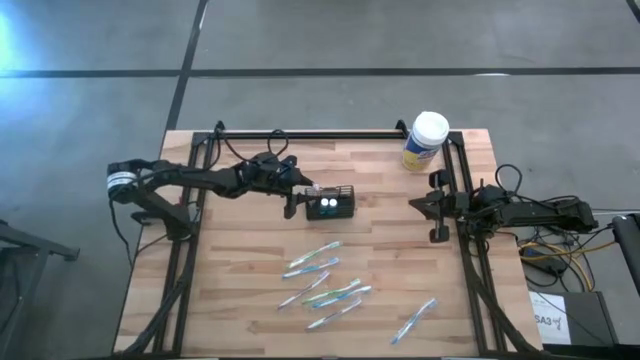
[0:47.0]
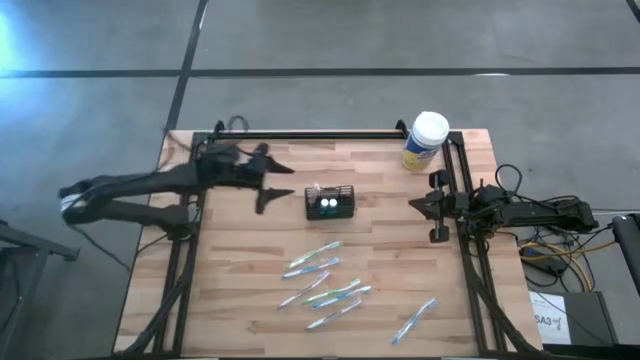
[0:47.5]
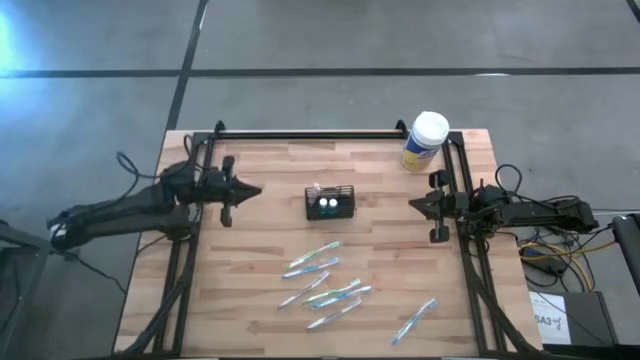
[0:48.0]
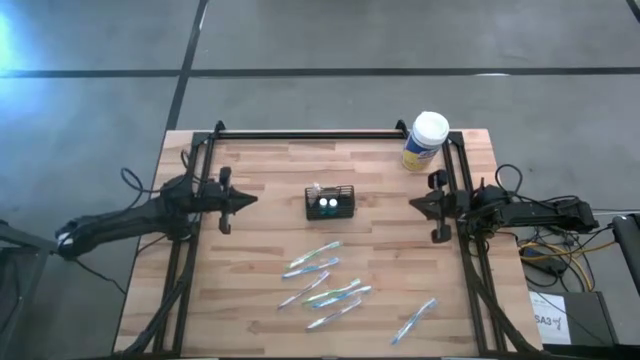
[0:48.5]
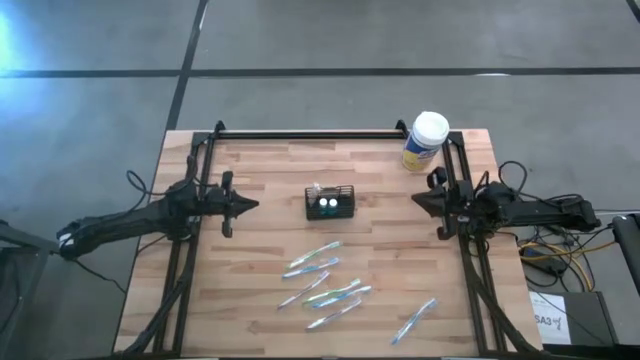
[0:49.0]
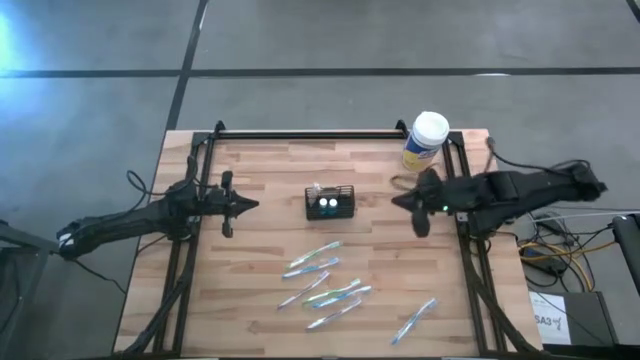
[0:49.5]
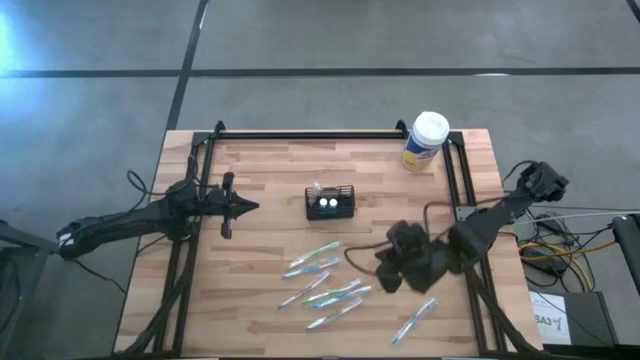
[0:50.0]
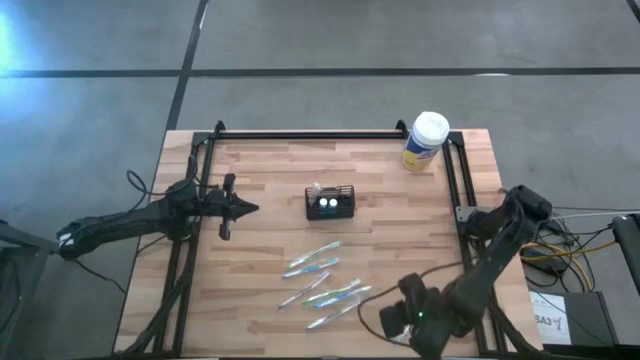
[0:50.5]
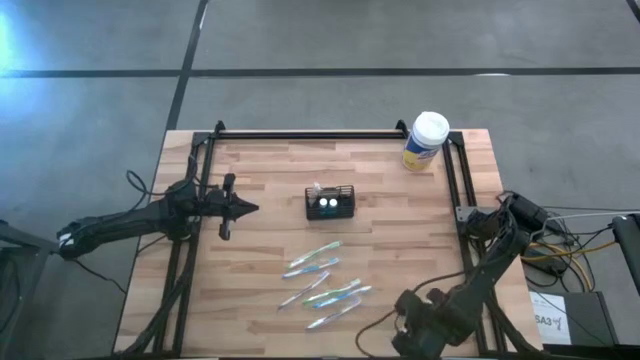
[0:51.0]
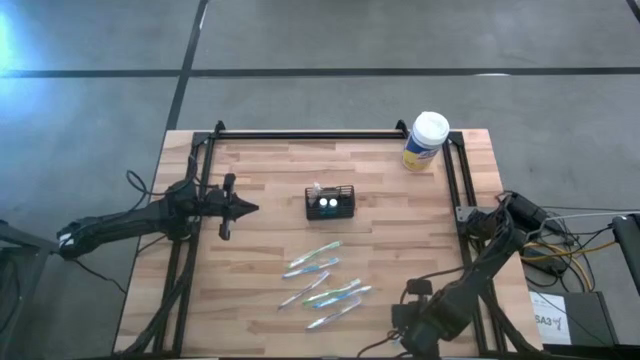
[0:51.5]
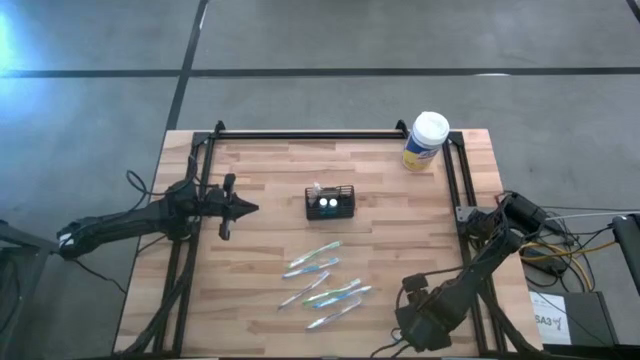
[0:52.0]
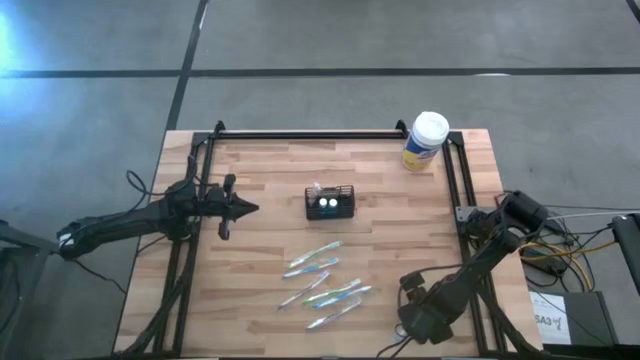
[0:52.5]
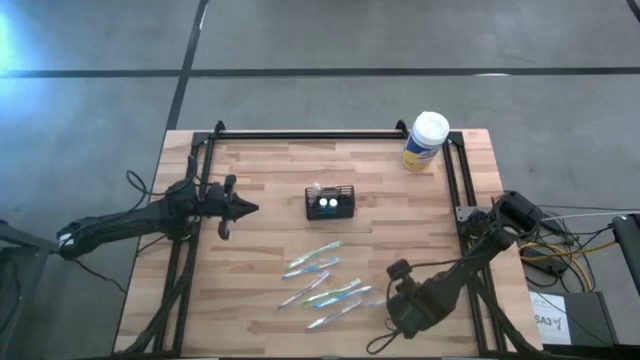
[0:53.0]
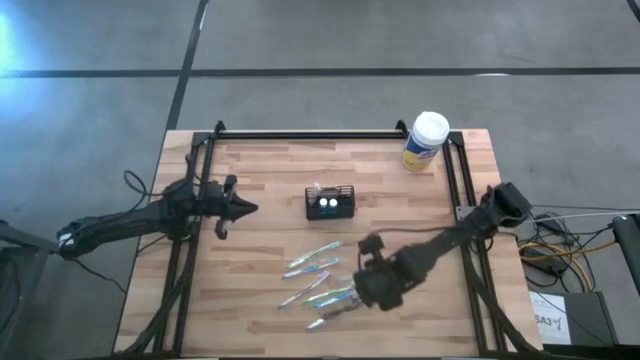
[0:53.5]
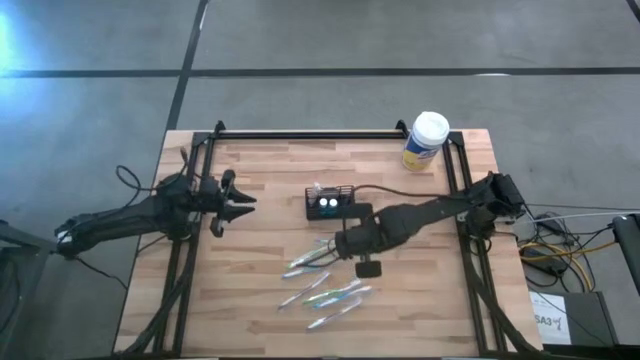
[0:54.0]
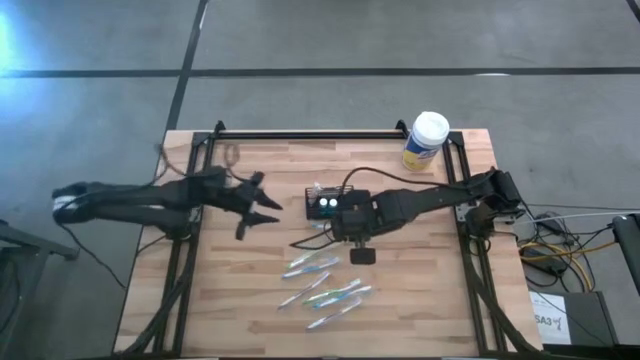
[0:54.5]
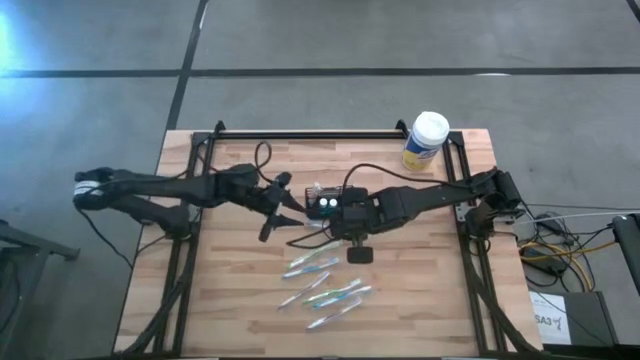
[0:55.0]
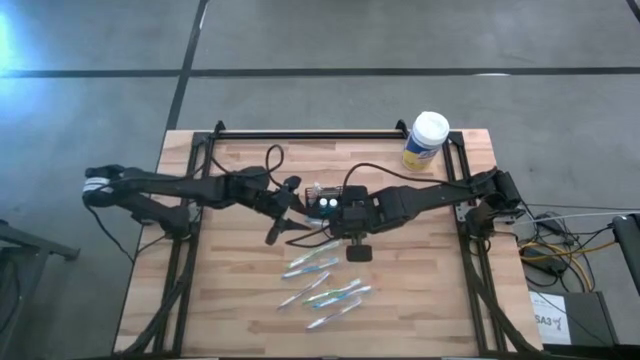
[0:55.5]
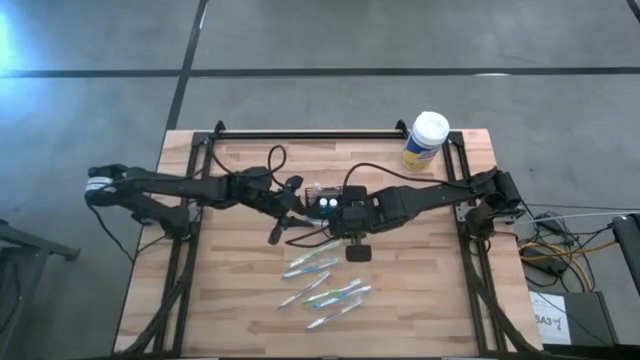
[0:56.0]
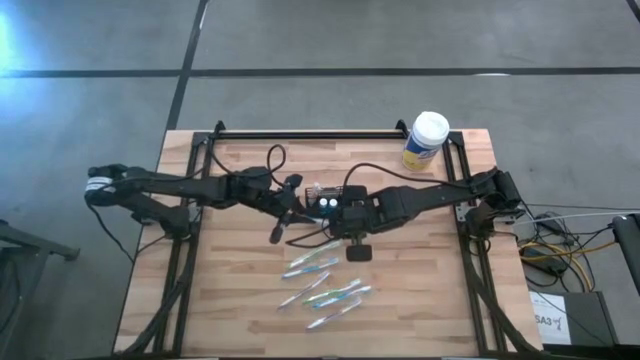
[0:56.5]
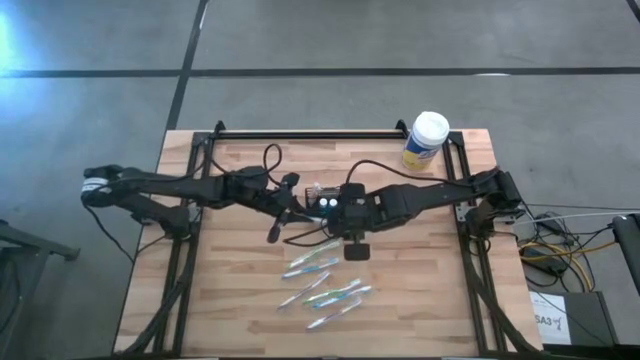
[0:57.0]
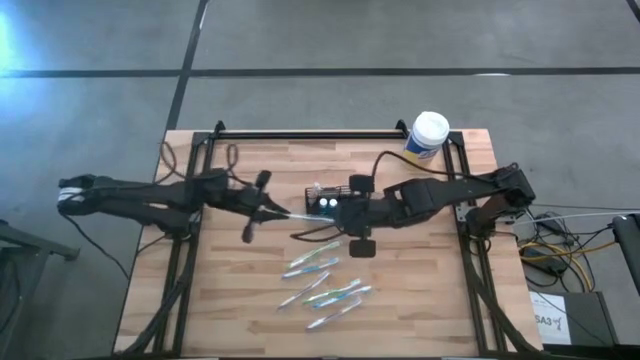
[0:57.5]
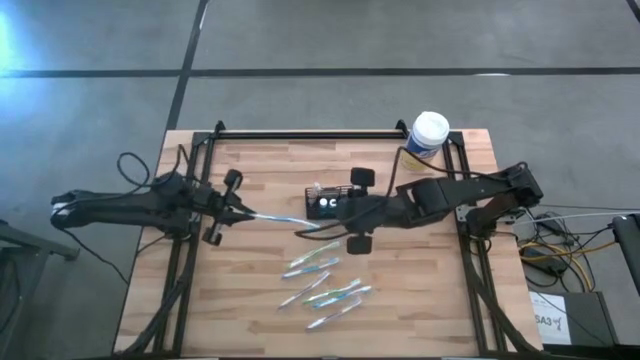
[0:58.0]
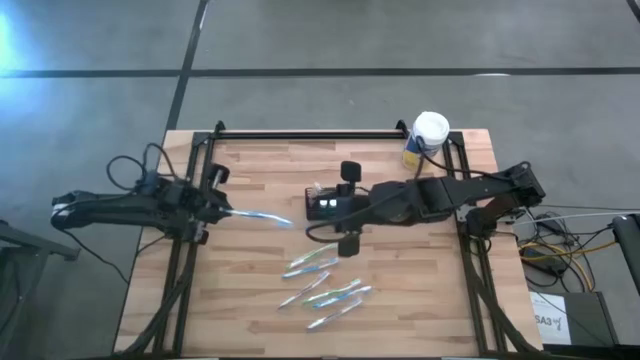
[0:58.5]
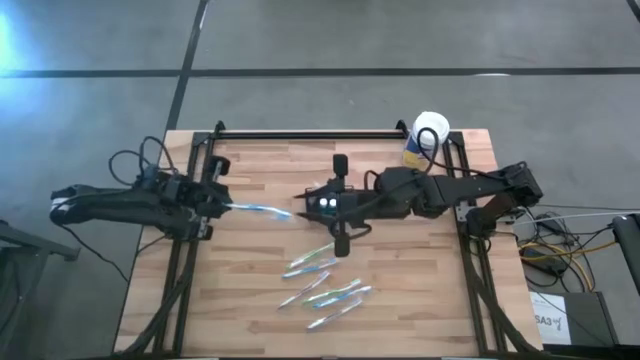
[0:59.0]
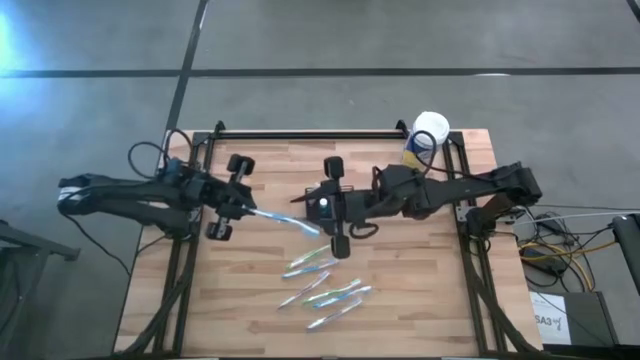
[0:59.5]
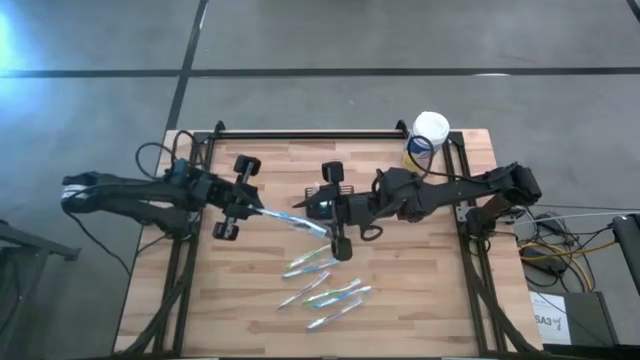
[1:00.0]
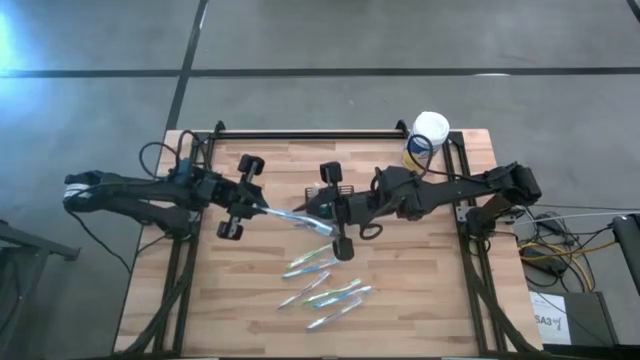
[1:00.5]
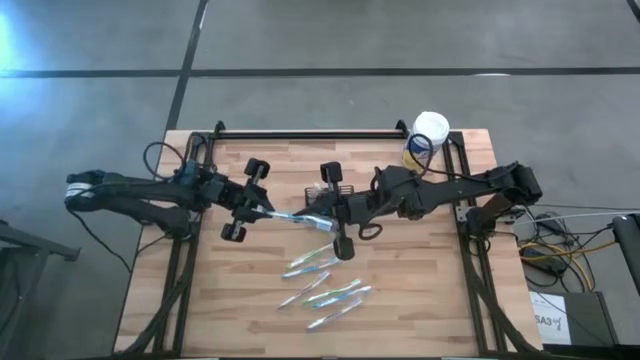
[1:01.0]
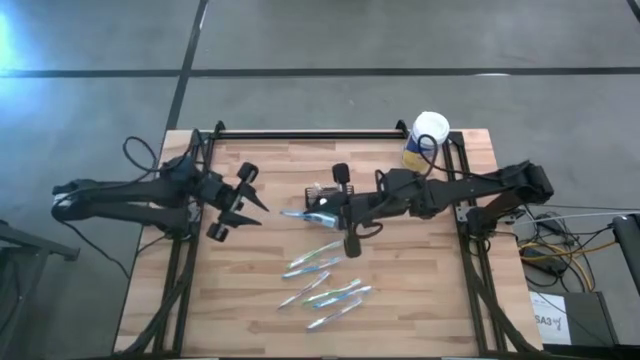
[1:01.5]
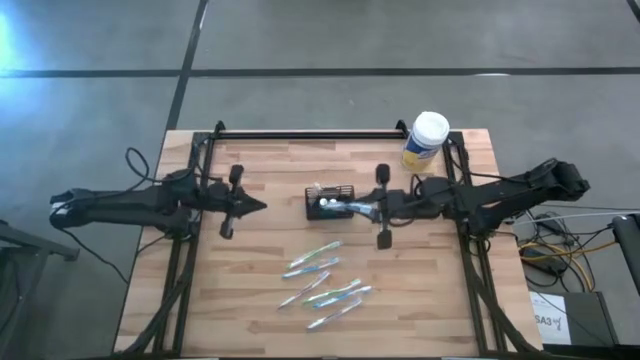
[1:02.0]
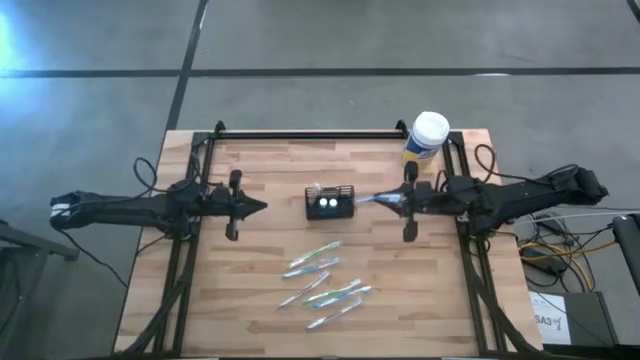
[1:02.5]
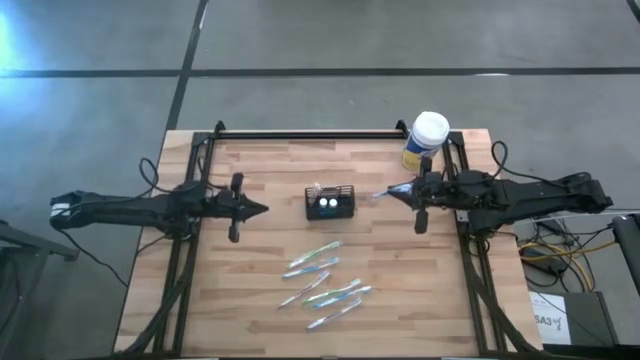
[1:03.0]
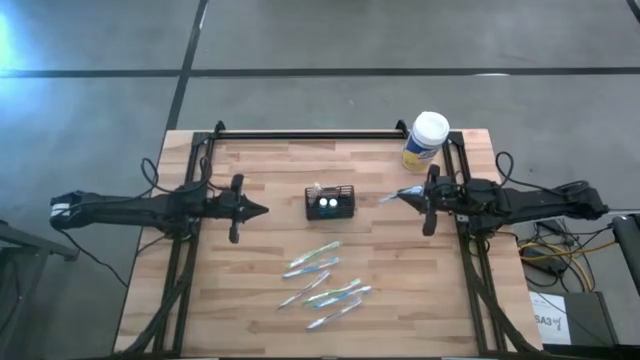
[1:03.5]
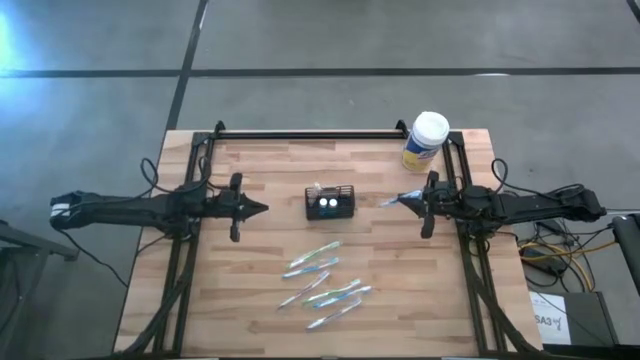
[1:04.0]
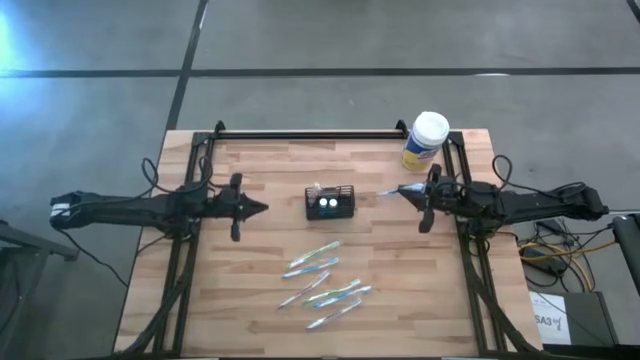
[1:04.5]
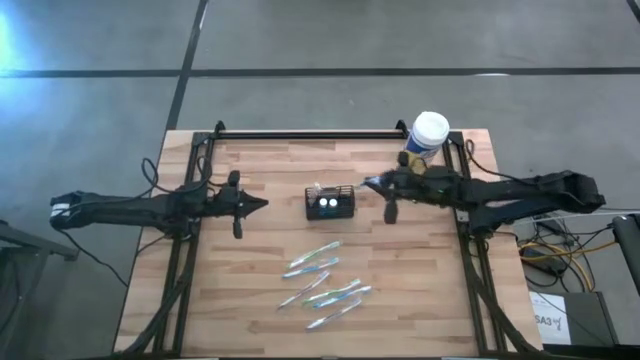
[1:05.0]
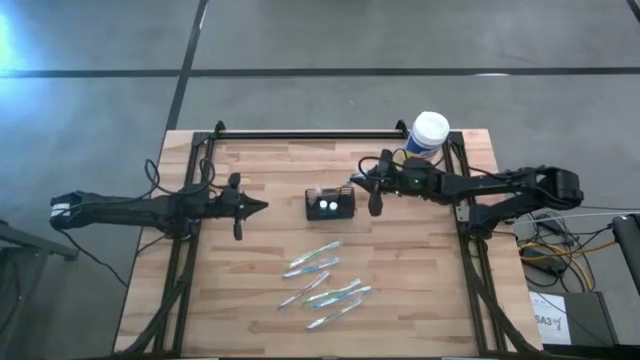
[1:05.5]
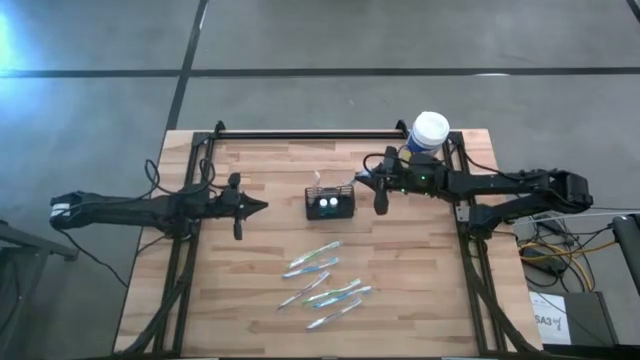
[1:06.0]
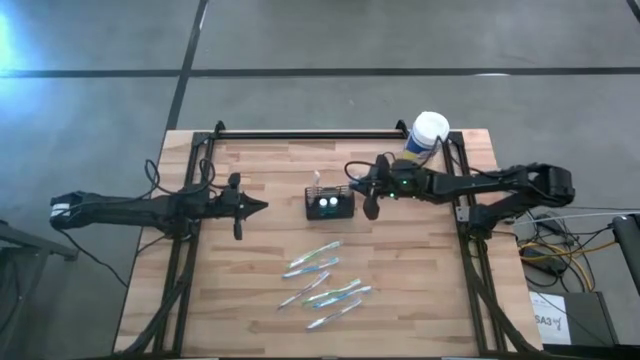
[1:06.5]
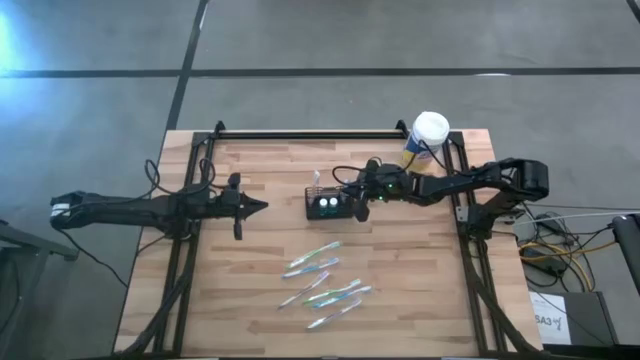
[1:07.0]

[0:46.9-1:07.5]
Task: Pick & Place toothbrushing station
Put the bottom right blue toothbrush in the wire organizer

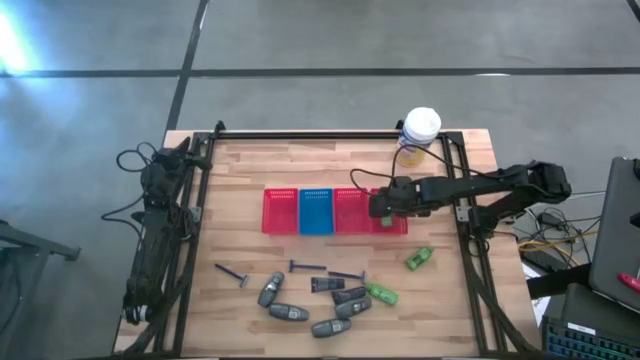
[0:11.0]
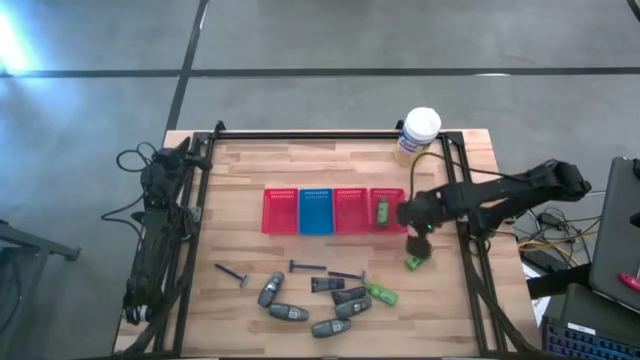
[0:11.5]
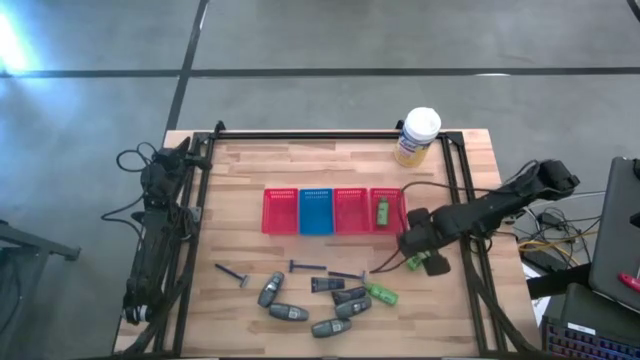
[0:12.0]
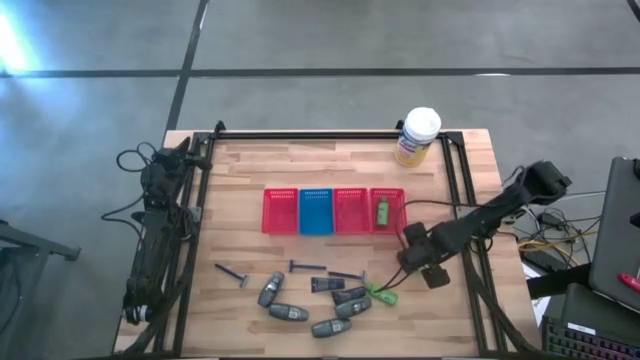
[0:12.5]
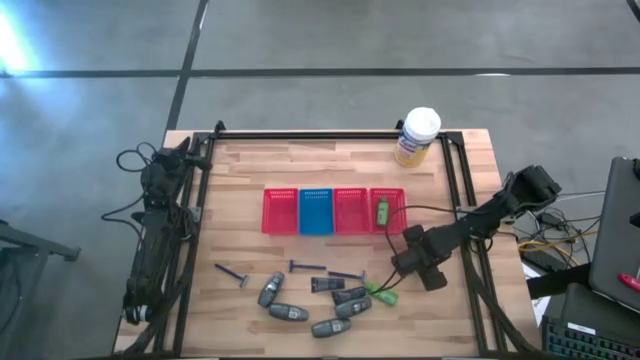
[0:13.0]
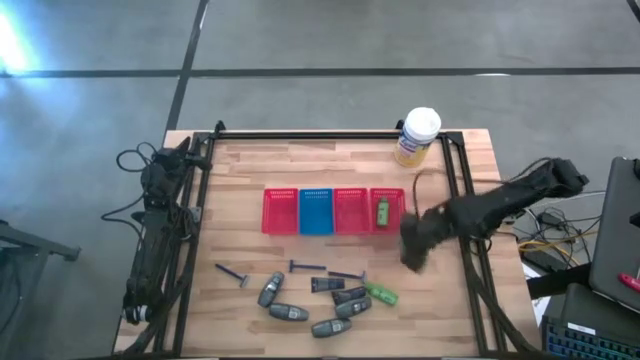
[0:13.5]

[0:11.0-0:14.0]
Task: Pick & Place Travel size toiletries
Put the green shampoo into the right red bin
